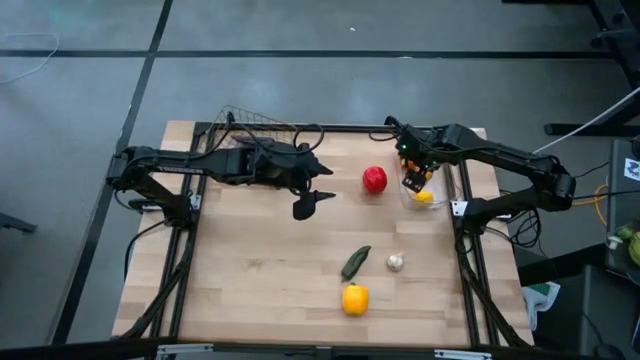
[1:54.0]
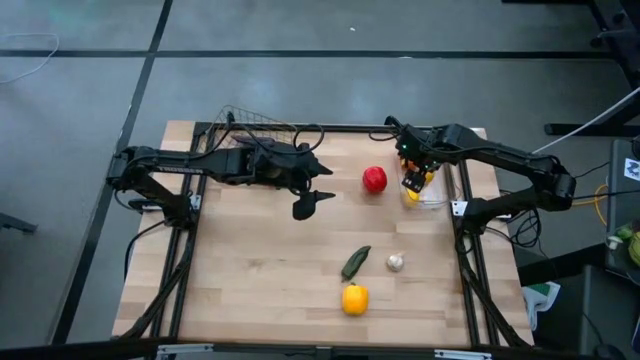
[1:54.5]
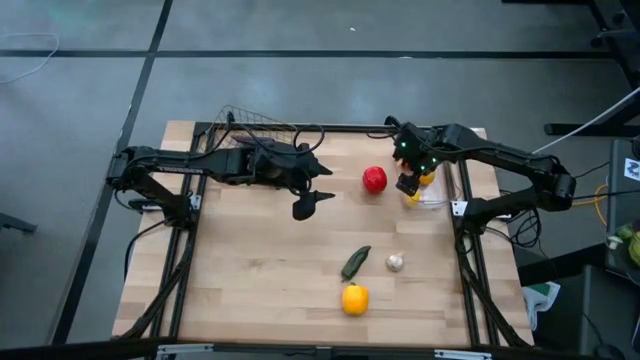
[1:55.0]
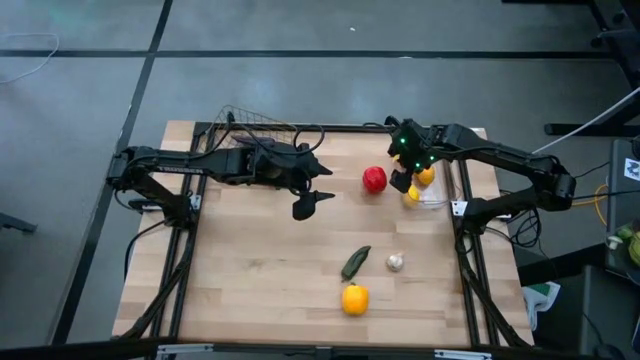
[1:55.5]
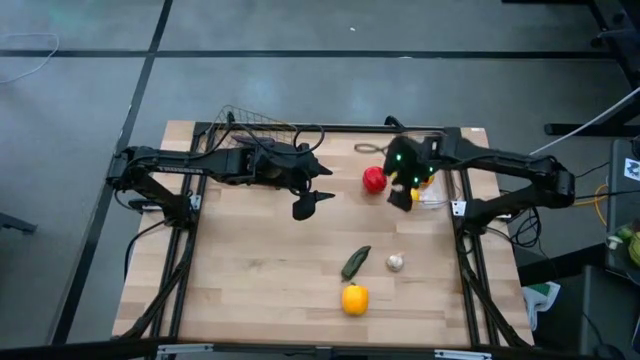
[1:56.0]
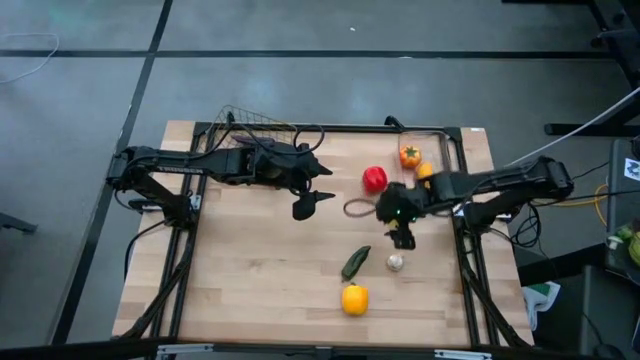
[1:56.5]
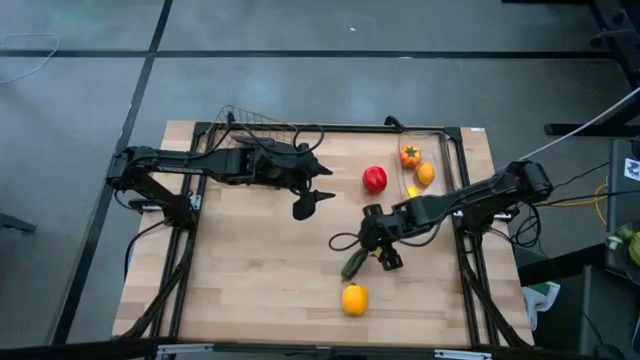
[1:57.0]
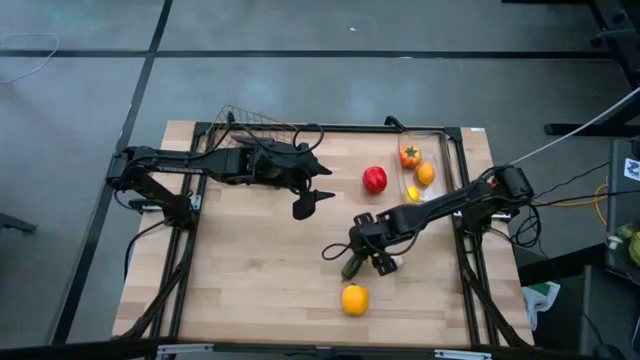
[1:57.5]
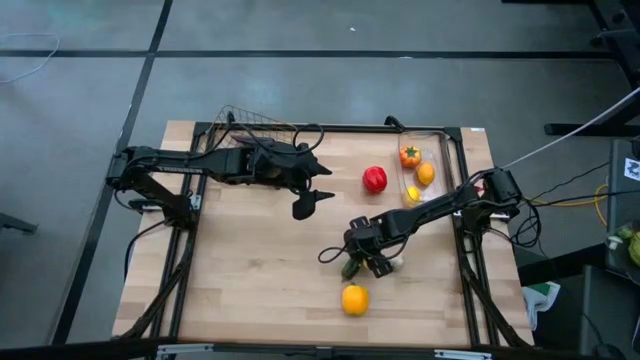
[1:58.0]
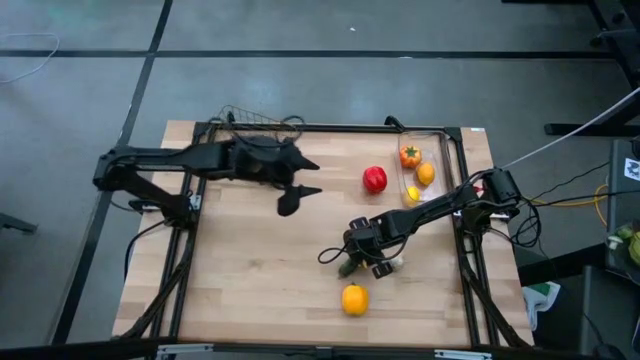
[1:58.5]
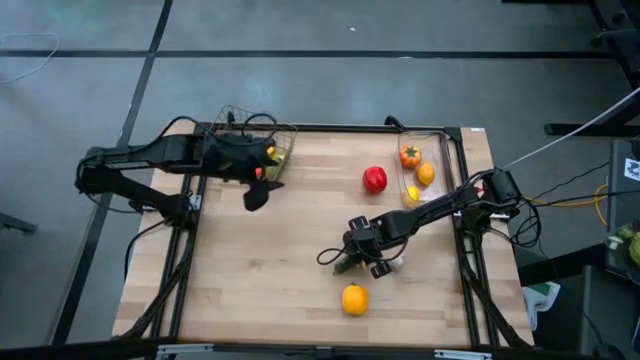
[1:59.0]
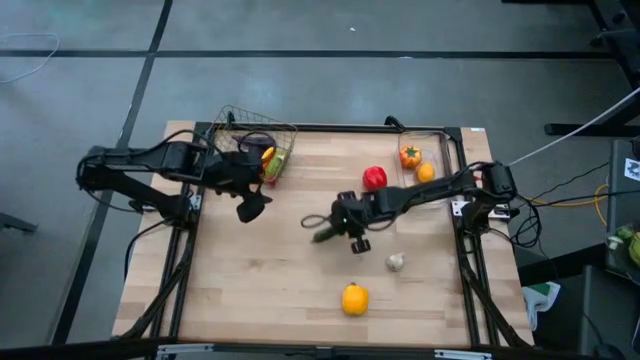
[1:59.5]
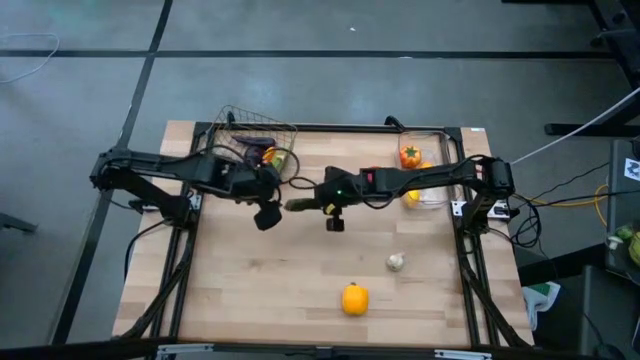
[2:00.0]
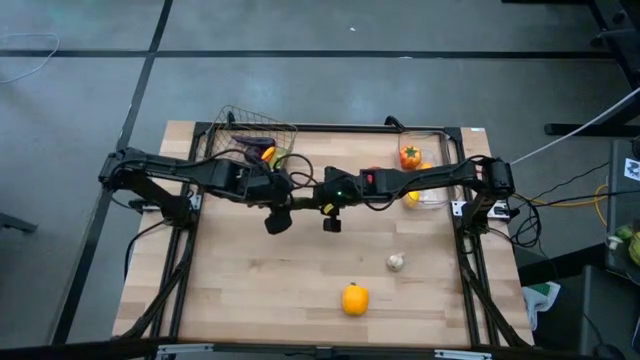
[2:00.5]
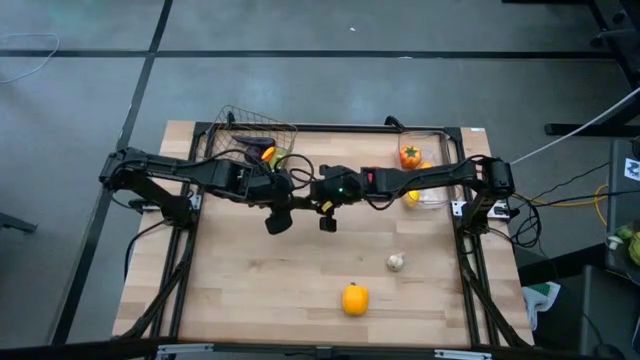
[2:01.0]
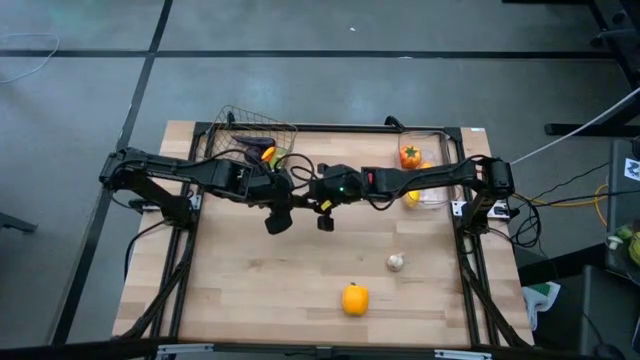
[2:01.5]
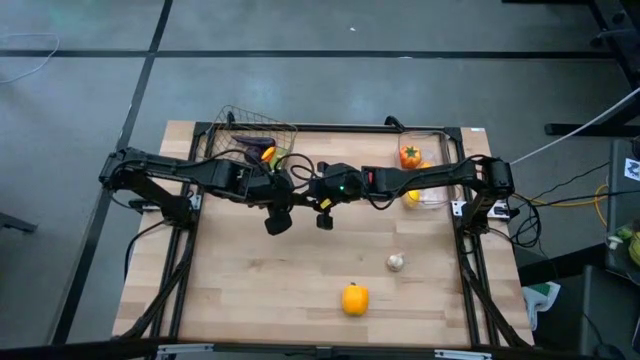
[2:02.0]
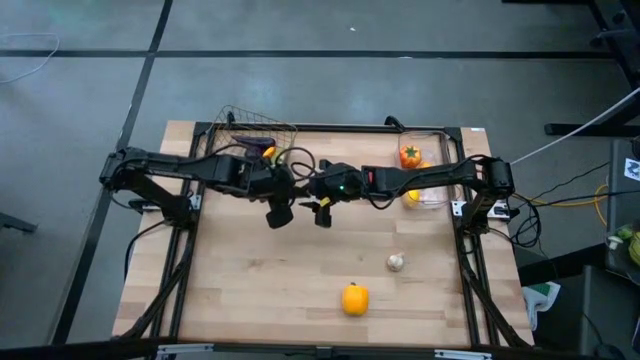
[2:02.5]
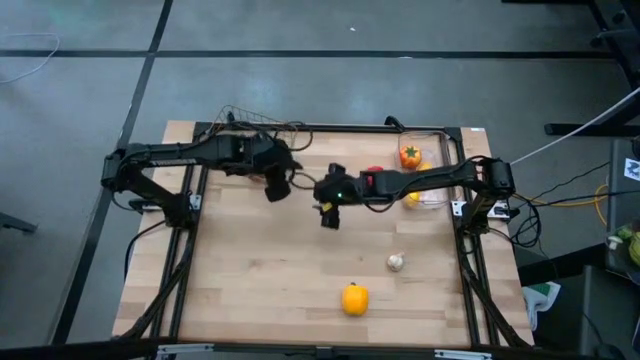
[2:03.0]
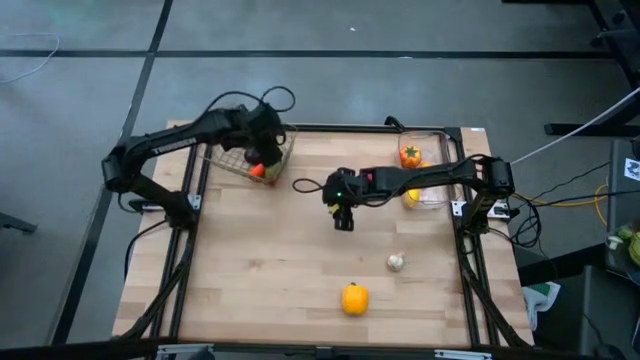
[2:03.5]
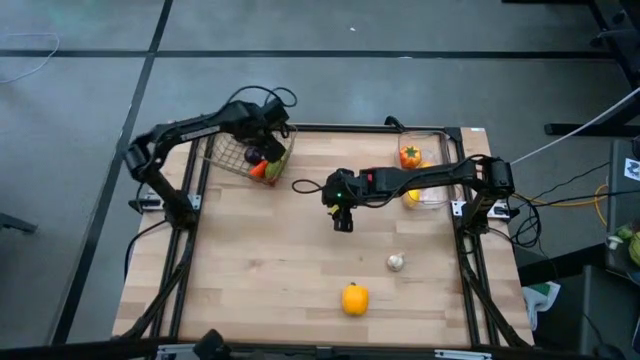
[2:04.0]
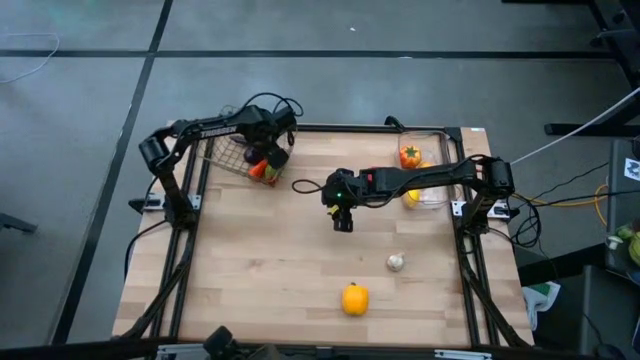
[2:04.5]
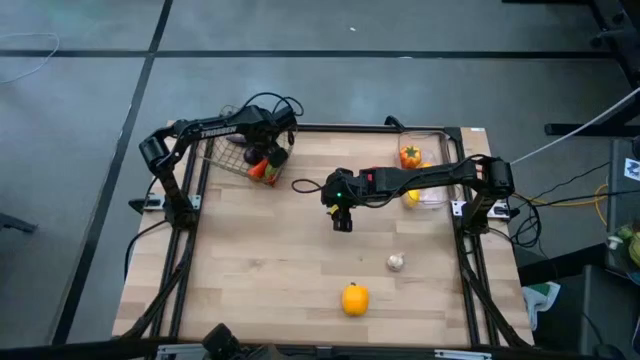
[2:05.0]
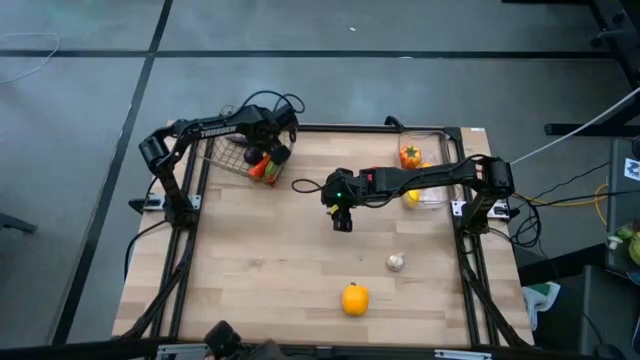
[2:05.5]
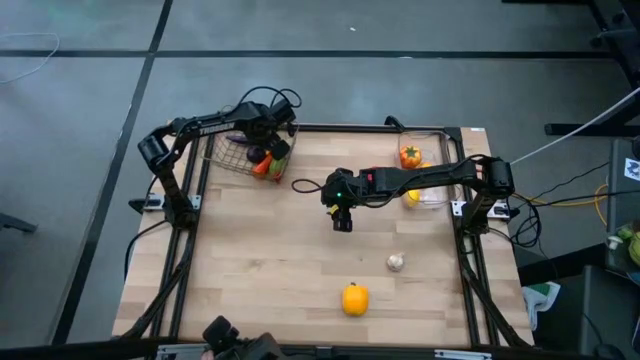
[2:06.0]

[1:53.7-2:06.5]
Task: Sort produce into baskets
Put the green chili pepper into the silver wire basket

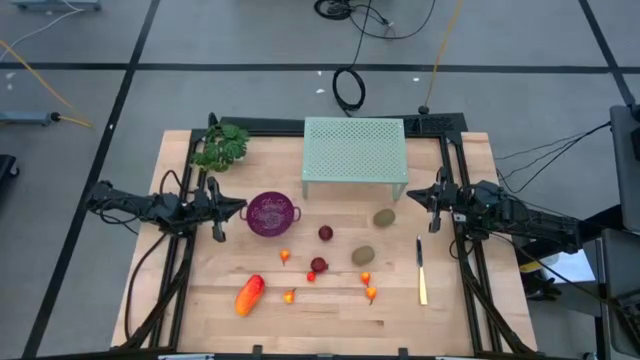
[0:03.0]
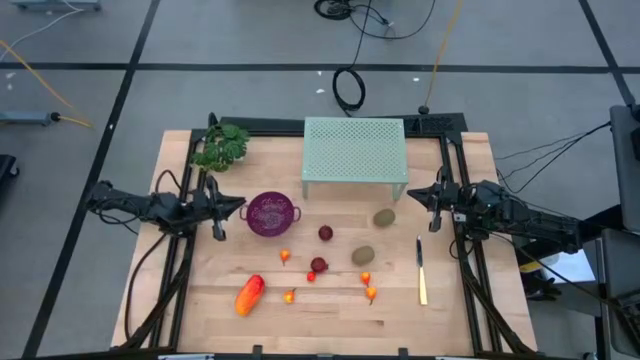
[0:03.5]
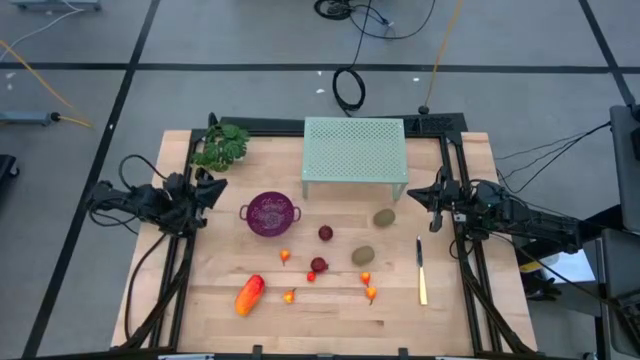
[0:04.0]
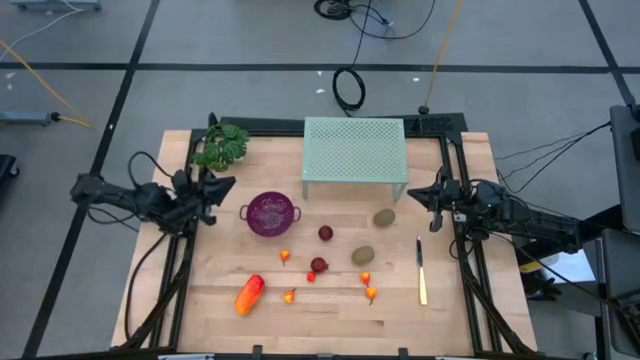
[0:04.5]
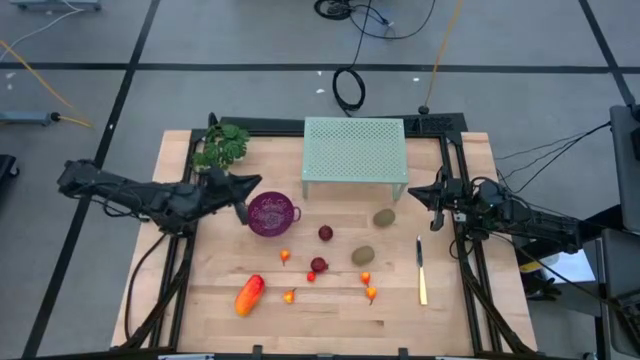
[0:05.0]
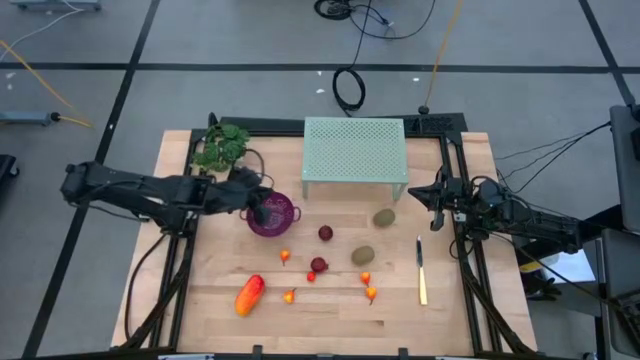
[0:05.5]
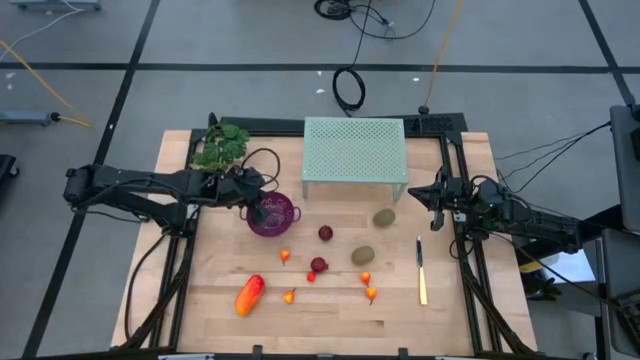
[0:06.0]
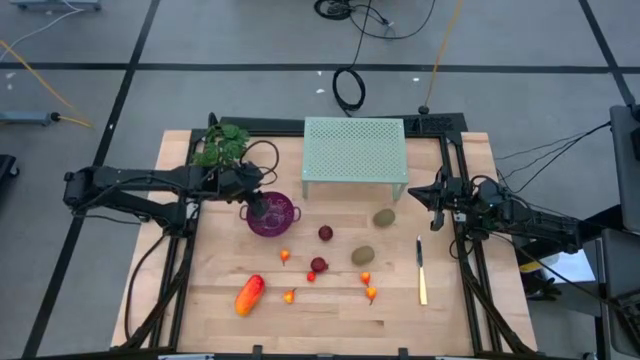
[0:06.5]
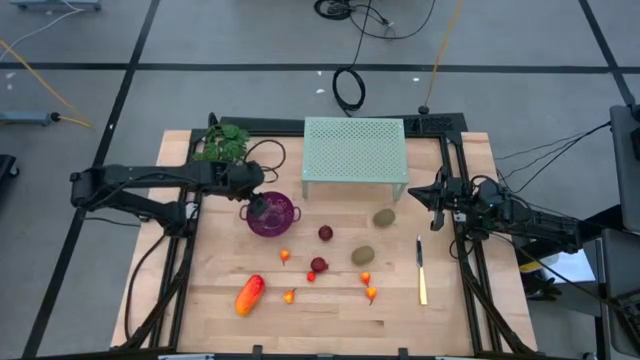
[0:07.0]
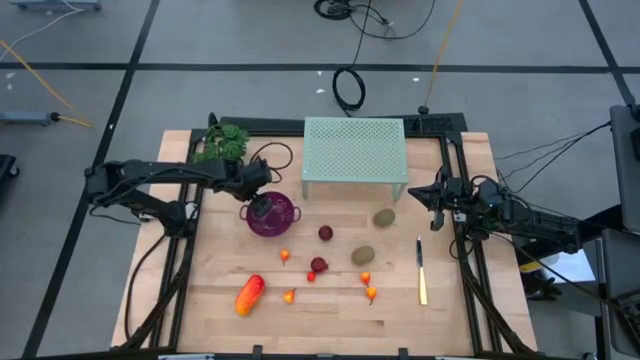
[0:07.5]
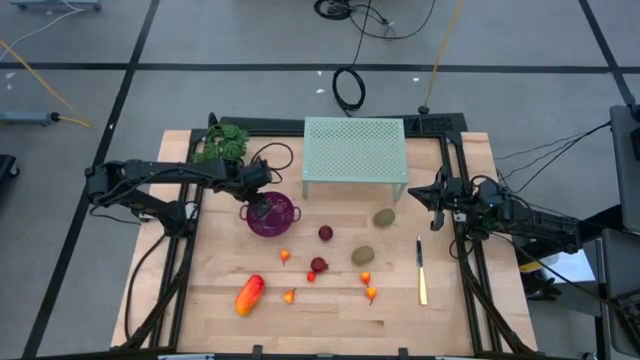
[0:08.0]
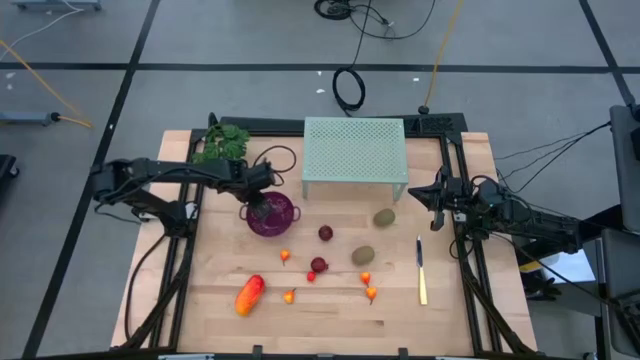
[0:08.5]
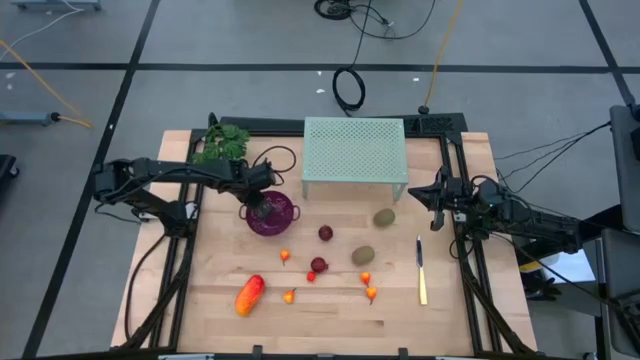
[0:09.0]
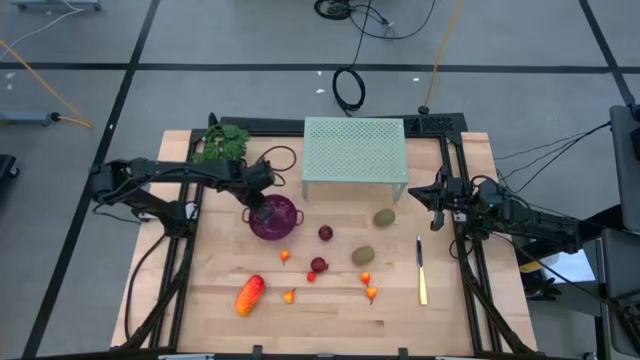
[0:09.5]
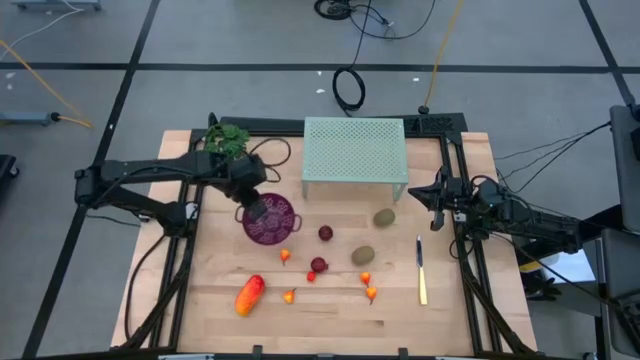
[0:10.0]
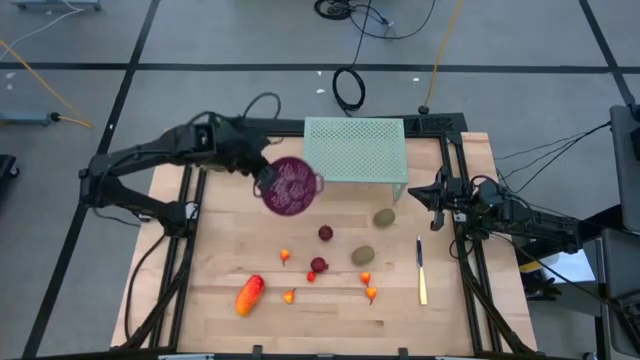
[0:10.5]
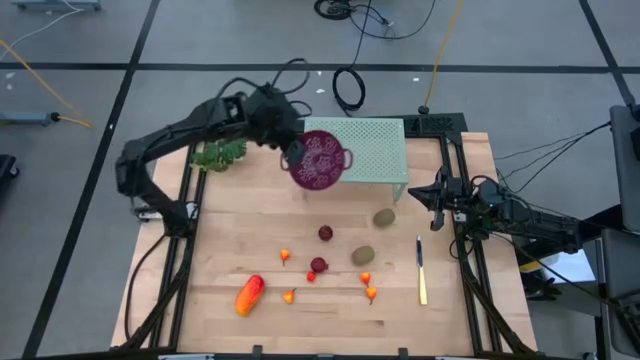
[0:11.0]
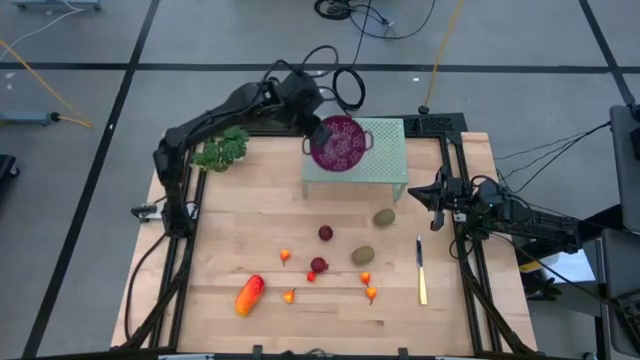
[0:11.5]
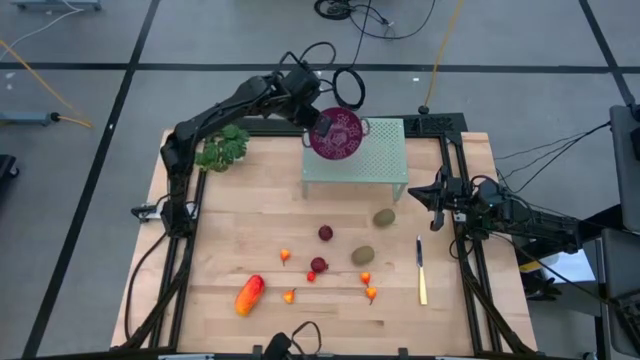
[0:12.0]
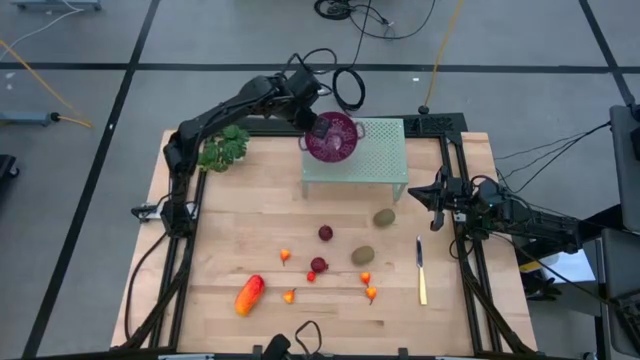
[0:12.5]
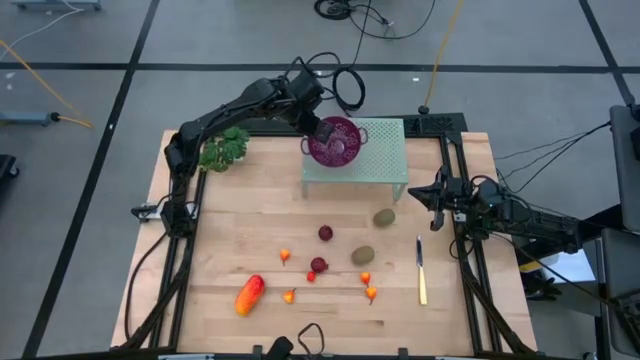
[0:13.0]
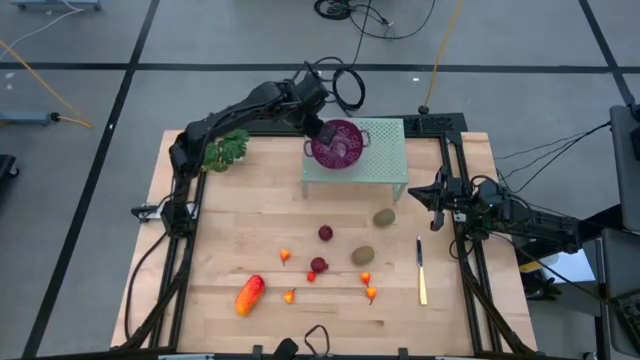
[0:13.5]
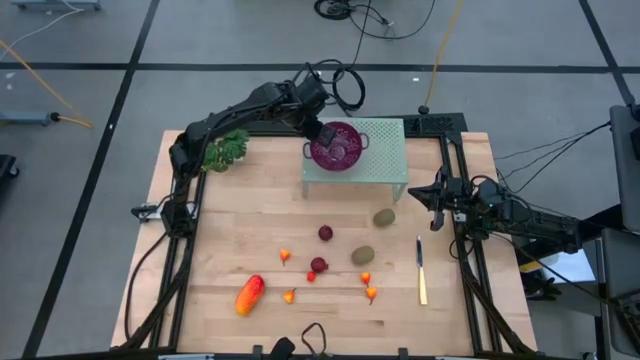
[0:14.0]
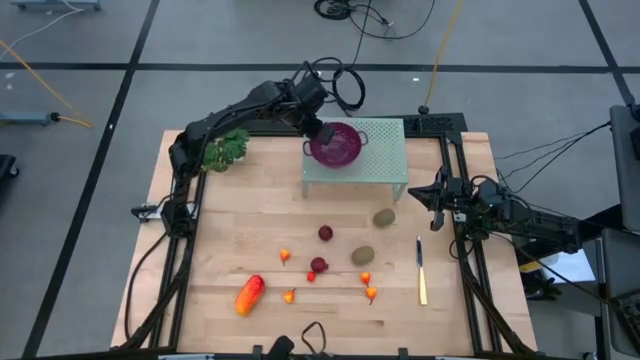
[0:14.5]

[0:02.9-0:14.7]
Task: Pick & Place Fruit
Put the strainer bowl on the shelf
